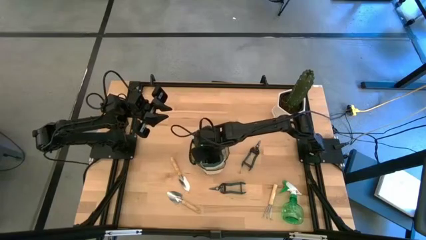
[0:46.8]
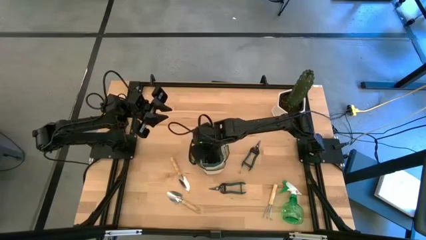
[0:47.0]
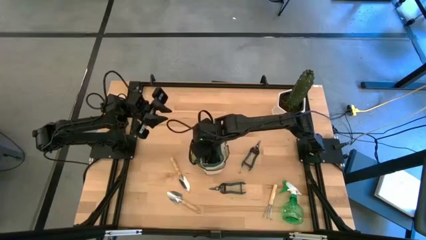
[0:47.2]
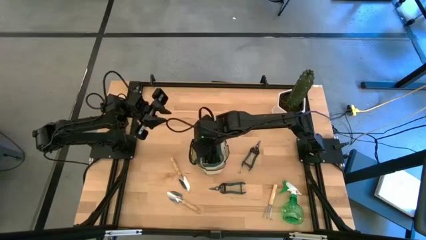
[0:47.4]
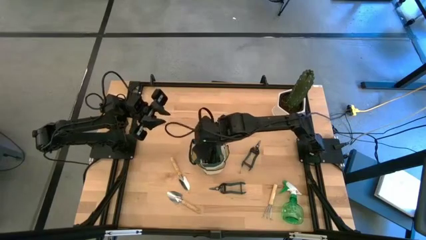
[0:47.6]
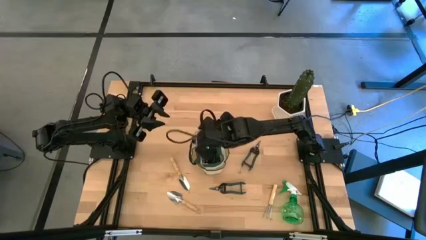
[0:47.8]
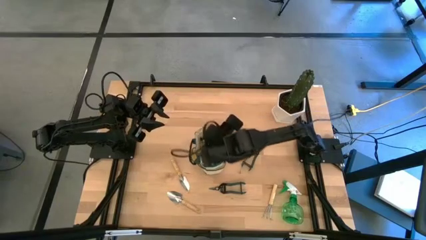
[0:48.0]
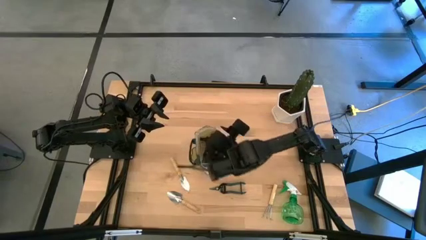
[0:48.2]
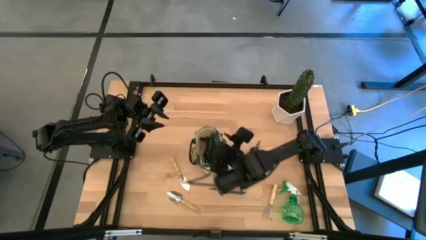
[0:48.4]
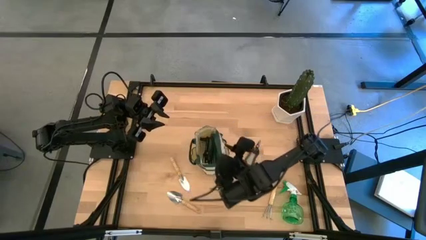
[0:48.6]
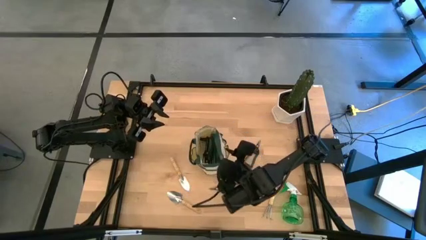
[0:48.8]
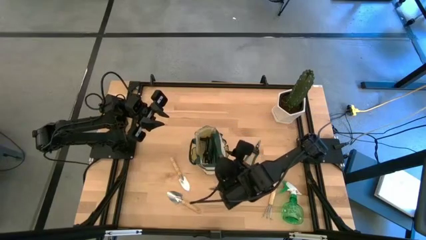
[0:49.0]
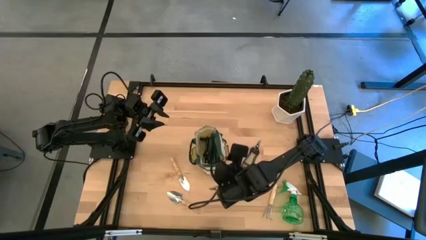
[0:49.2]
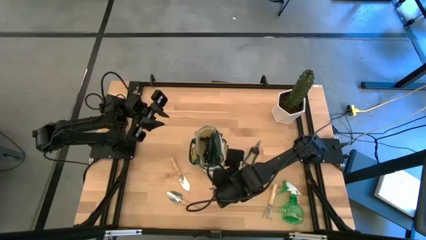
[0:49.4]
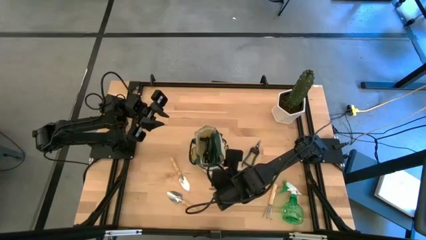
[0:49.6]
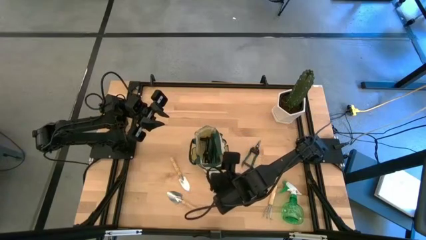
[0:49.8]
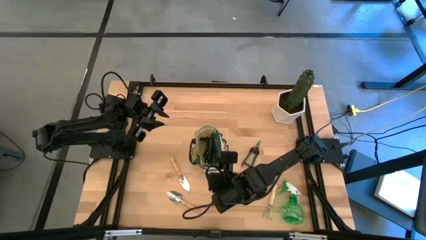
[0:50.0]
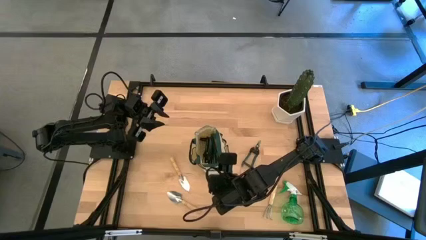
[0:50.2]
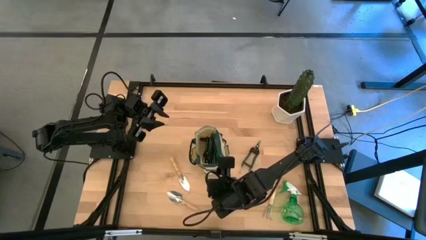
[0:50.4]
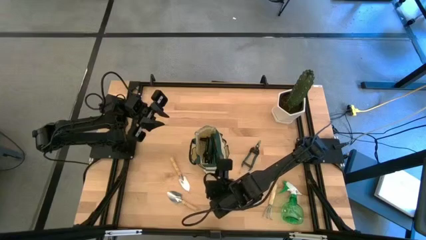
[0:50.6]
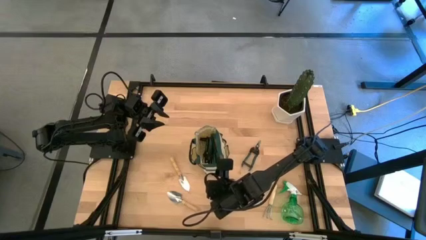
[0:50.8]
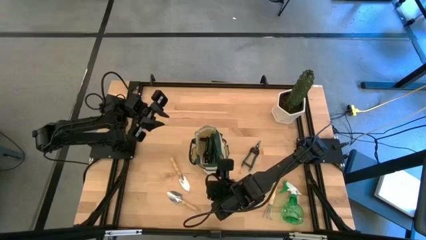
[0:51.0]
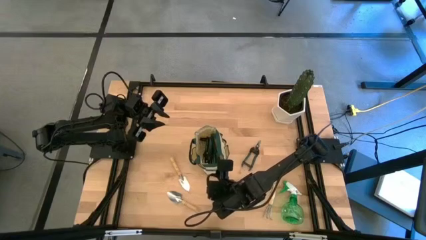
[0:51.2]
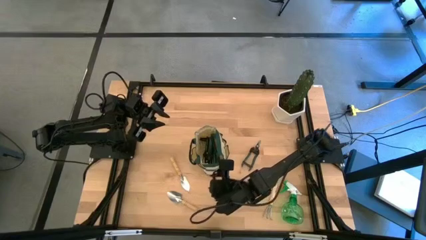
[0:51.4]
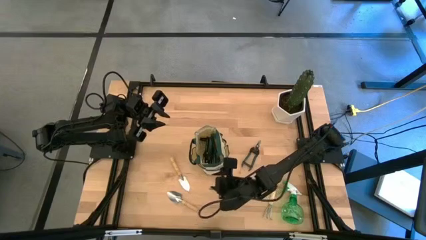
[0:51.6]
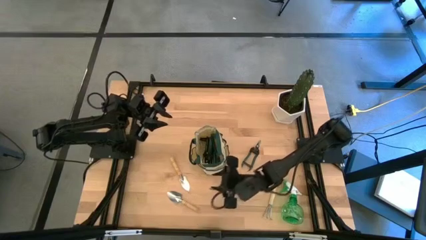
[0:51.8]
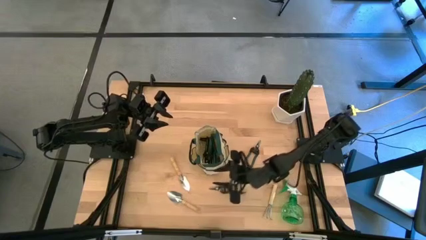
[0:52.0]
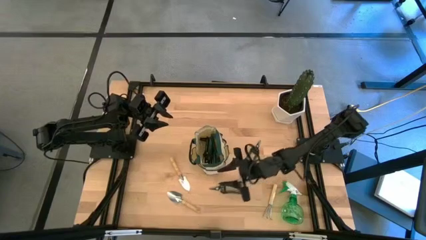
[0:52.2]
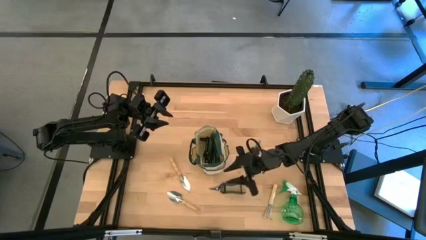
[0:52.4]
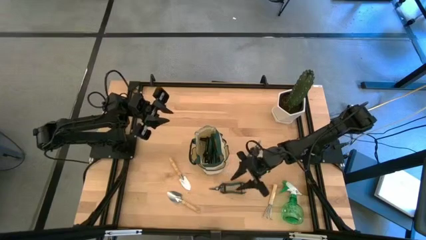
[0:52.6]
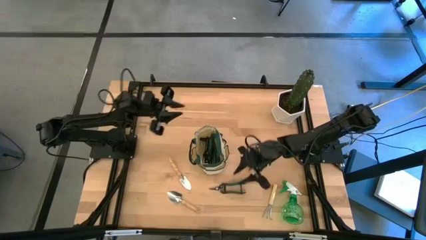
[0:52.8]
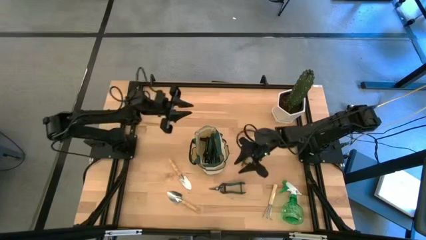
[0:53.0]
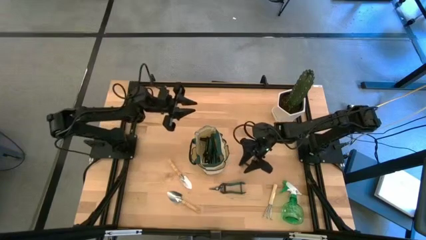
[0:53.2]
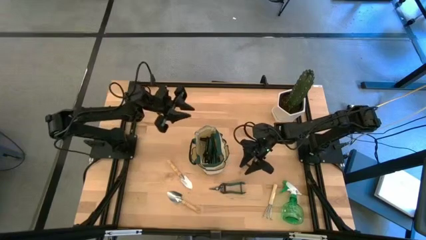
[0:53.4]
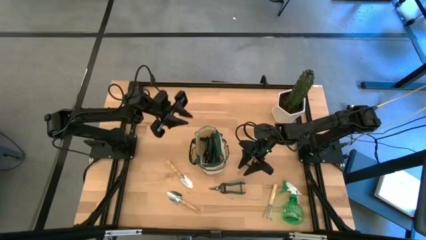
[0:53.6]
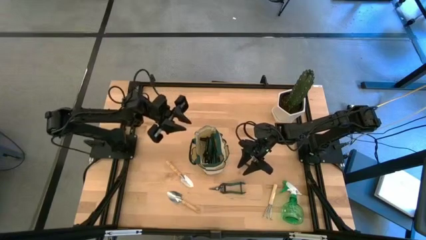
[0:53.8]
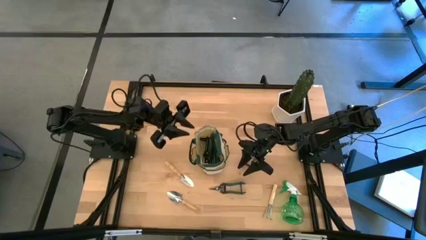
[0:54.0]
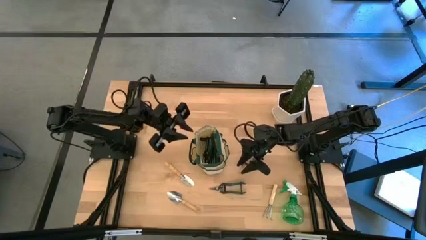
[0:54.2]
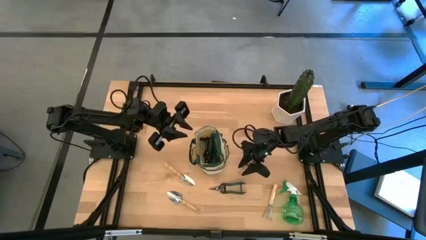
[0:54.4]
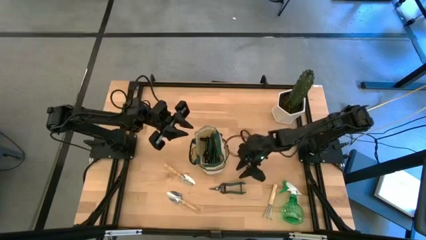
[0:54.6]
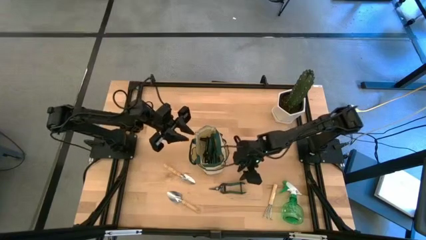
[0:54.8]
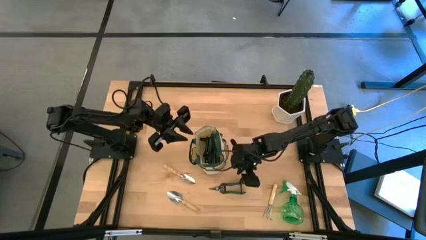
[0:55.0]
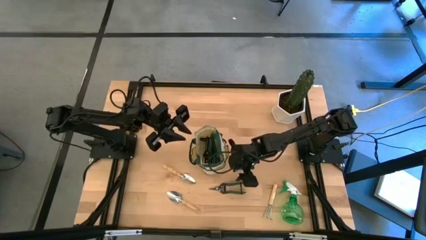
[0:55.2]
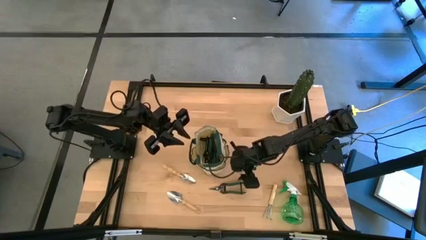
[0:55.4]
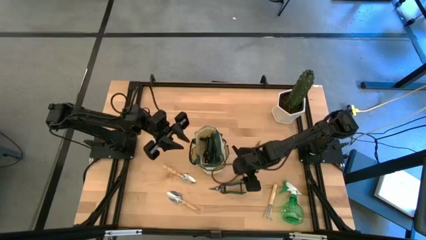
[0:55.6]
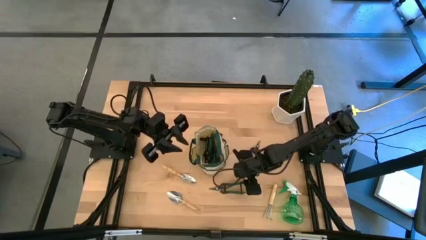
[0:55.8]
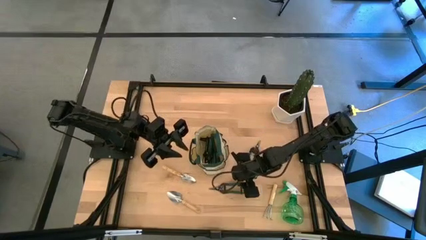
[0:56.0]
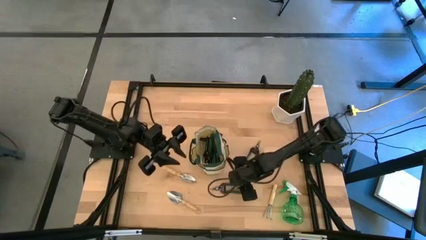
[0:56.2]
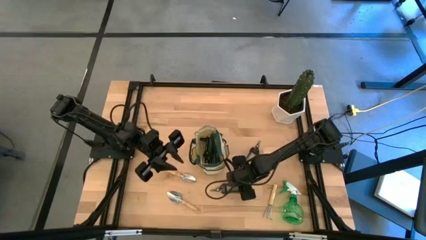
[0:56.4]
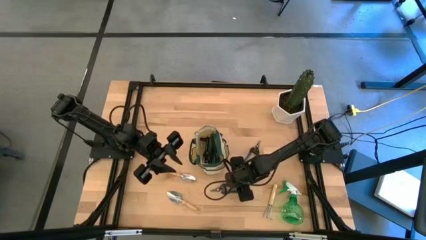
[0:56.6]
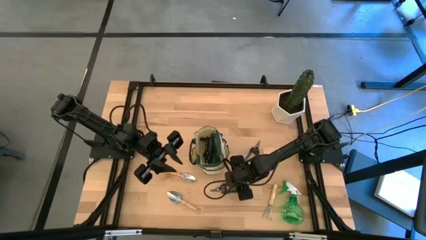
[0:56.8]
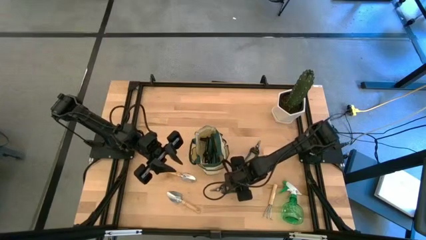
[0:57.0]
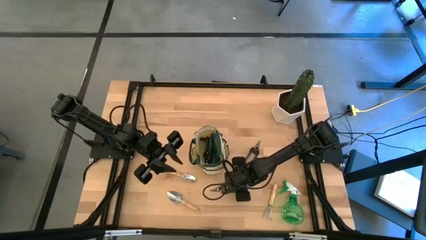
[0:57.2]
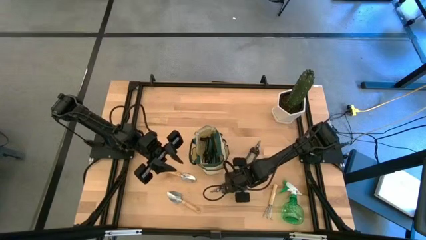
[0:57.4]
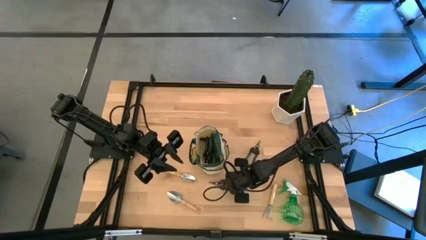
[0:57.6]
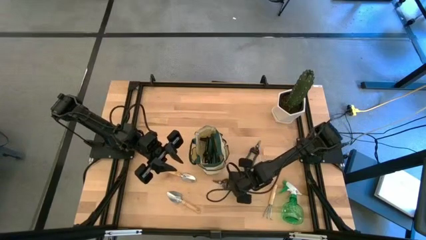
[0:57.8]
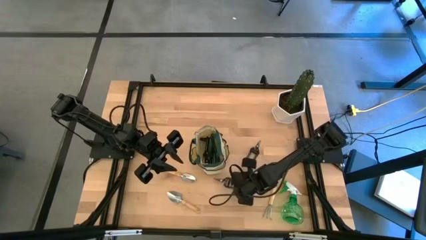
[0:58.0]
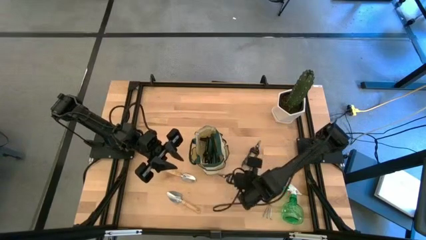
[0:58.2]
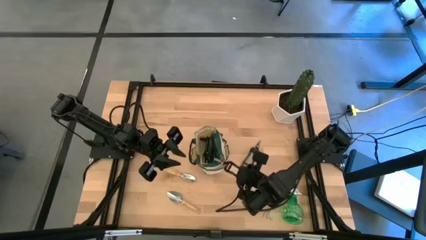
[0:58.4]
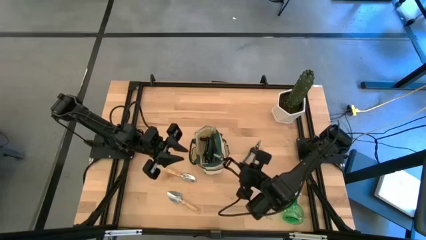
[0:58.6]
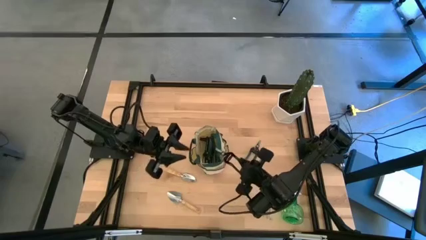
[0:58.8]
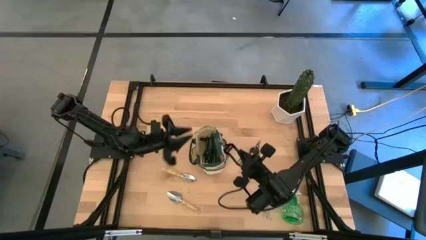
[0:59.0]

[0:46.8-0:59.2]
Task: Pick & Place Garden tools in Gardening bag
Put the bottom green fruit pruner into the green gardening bag
